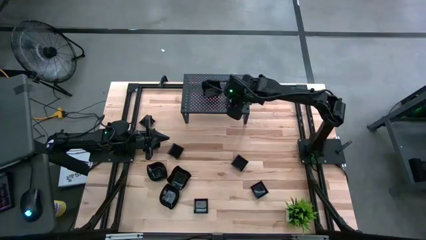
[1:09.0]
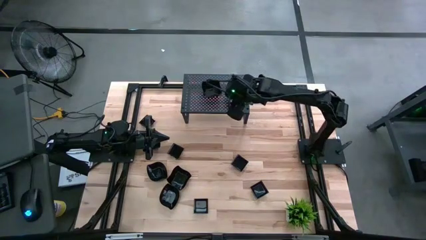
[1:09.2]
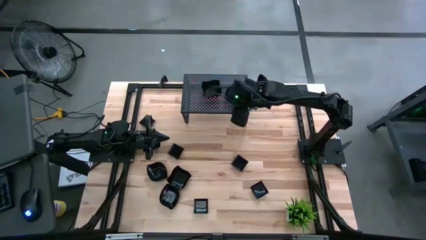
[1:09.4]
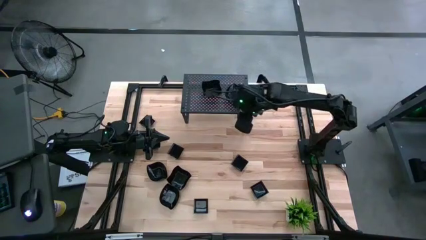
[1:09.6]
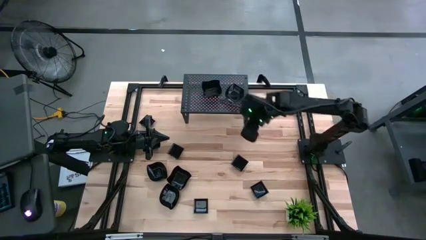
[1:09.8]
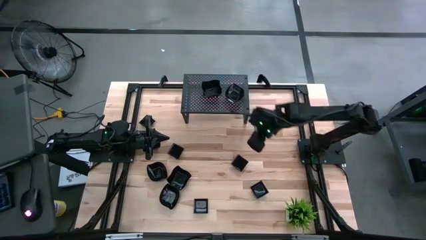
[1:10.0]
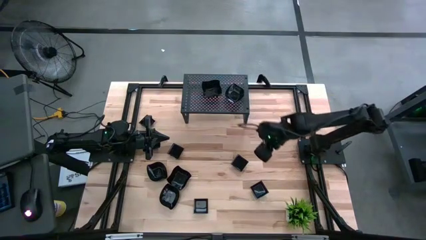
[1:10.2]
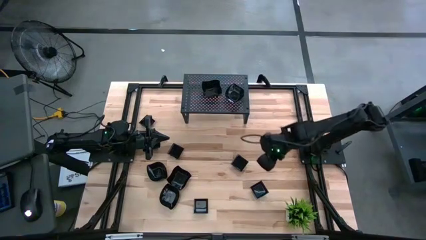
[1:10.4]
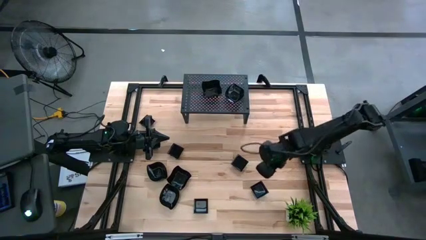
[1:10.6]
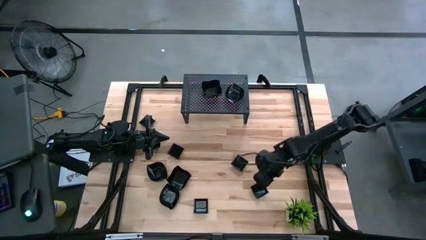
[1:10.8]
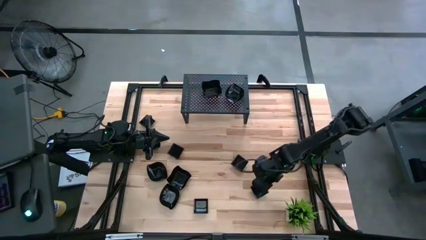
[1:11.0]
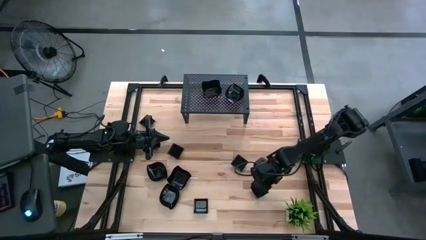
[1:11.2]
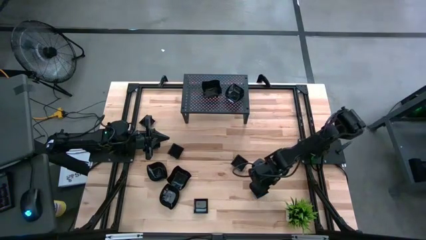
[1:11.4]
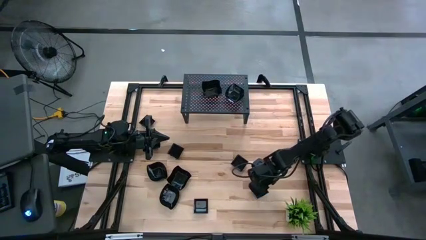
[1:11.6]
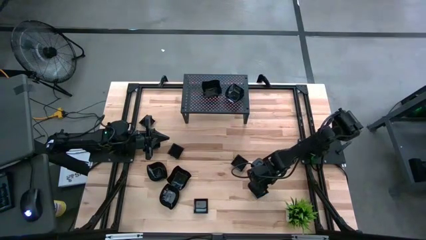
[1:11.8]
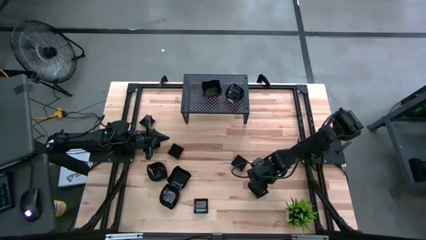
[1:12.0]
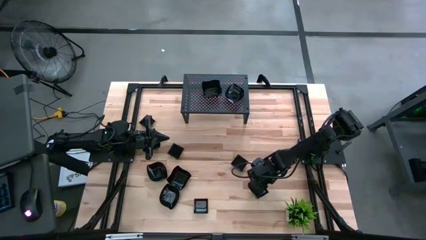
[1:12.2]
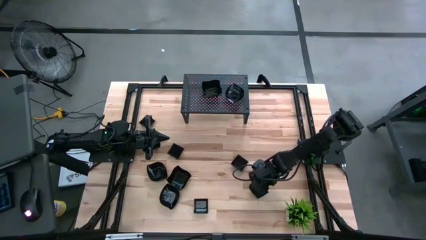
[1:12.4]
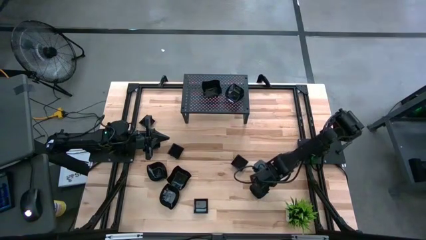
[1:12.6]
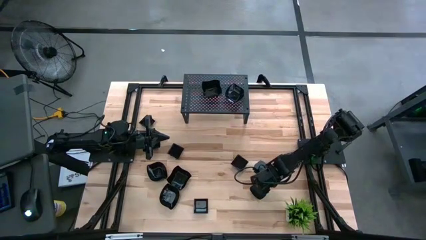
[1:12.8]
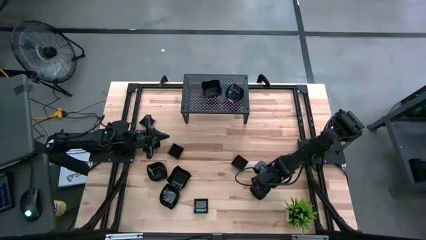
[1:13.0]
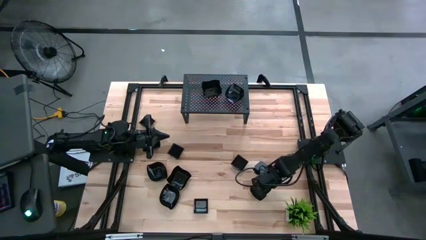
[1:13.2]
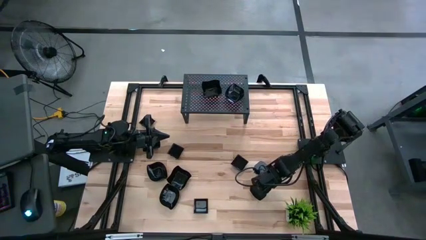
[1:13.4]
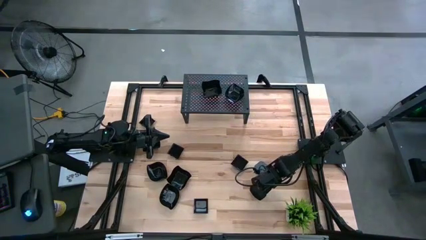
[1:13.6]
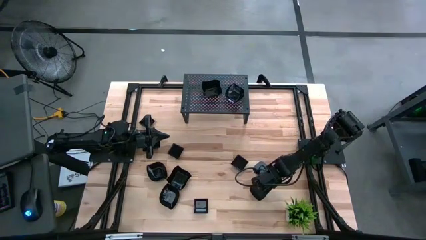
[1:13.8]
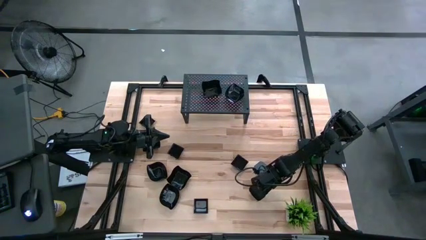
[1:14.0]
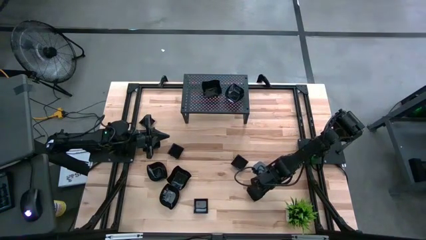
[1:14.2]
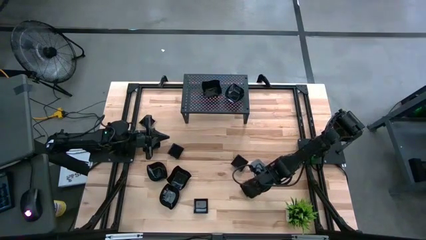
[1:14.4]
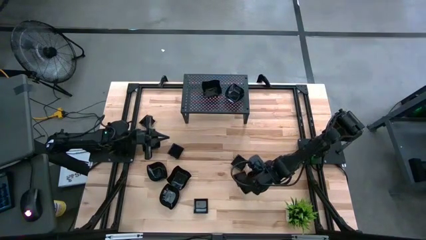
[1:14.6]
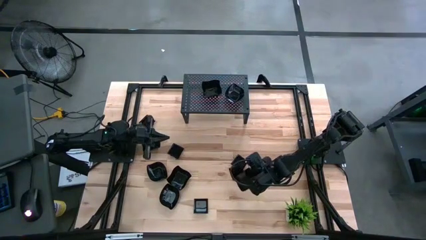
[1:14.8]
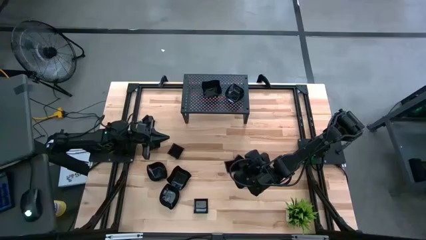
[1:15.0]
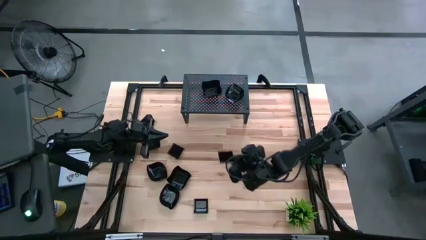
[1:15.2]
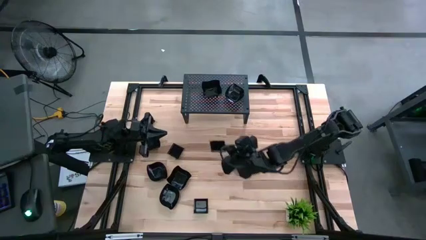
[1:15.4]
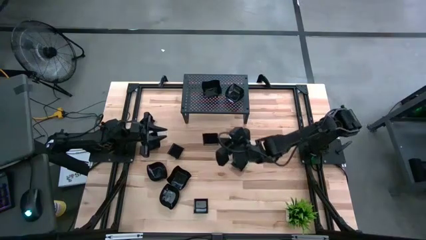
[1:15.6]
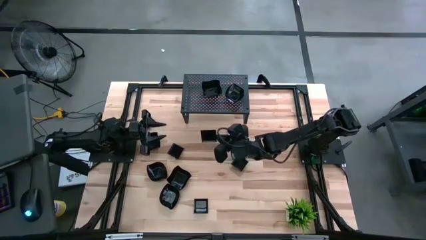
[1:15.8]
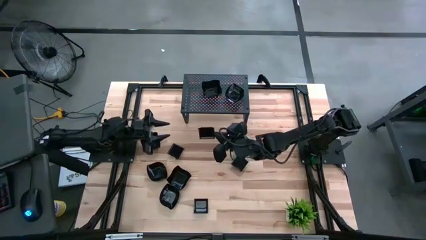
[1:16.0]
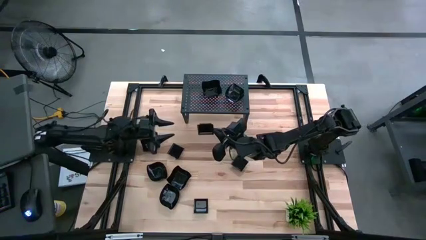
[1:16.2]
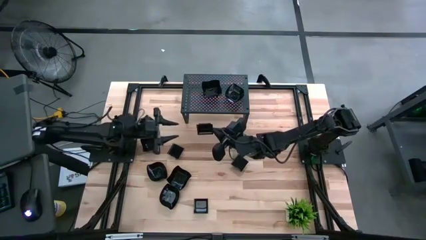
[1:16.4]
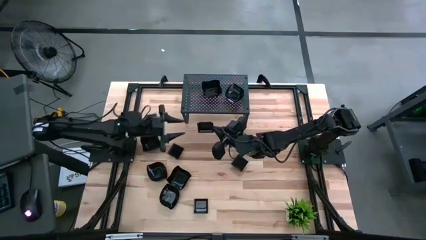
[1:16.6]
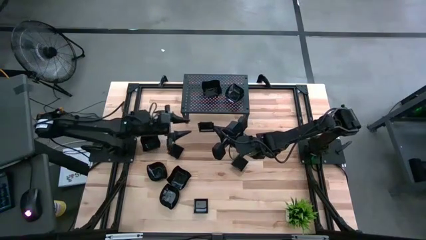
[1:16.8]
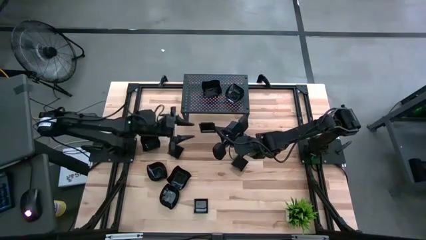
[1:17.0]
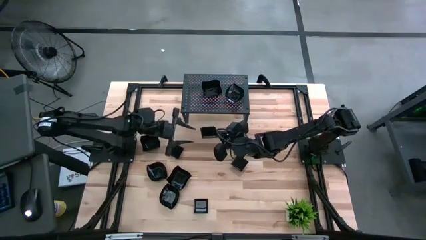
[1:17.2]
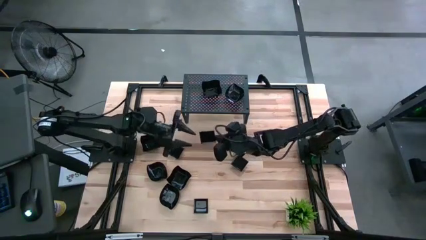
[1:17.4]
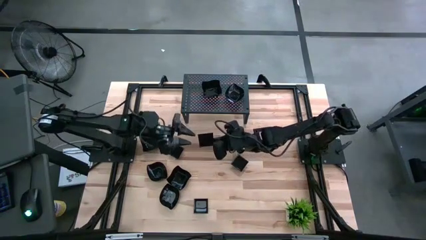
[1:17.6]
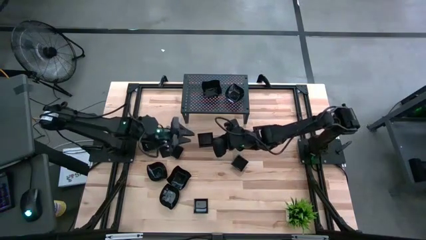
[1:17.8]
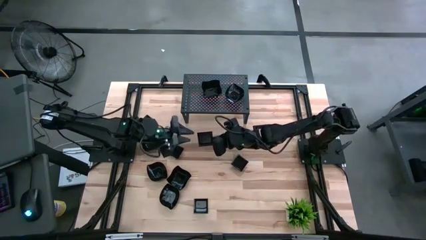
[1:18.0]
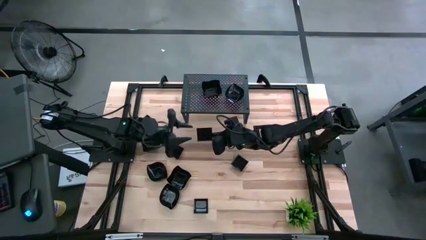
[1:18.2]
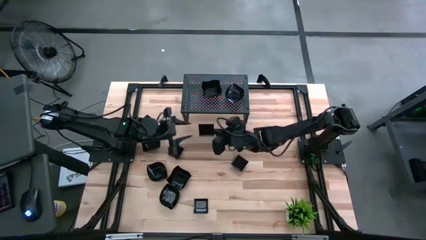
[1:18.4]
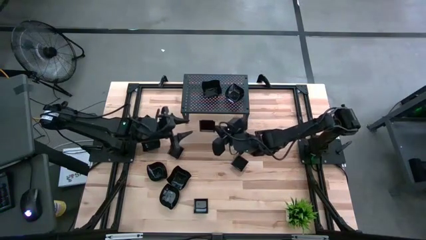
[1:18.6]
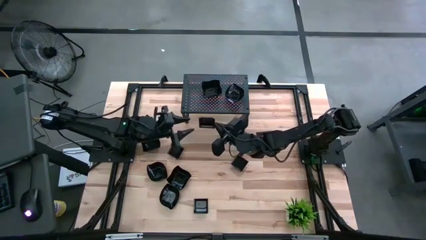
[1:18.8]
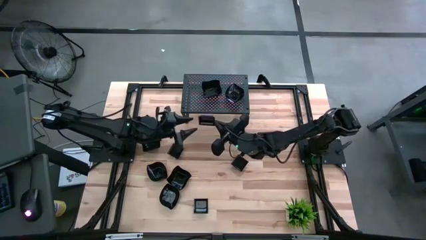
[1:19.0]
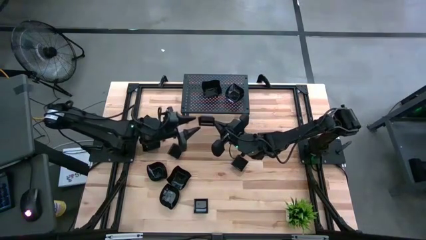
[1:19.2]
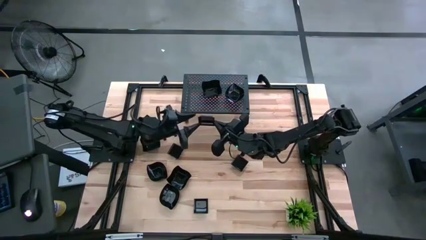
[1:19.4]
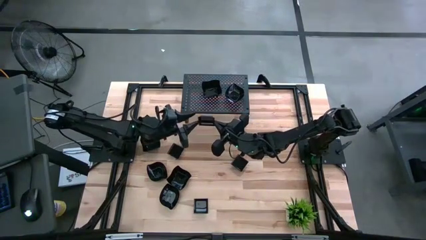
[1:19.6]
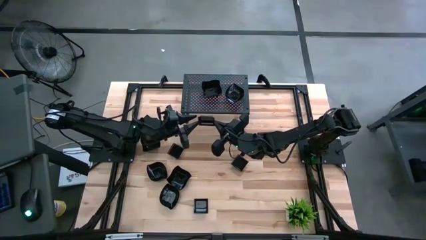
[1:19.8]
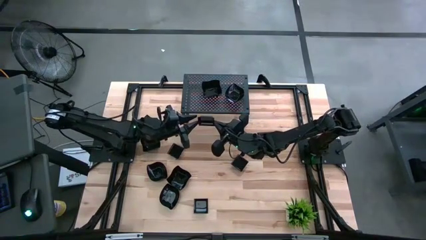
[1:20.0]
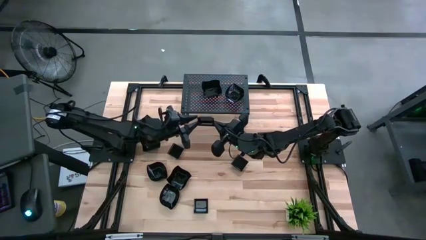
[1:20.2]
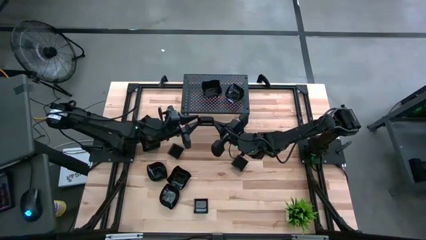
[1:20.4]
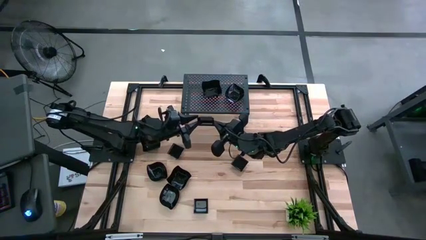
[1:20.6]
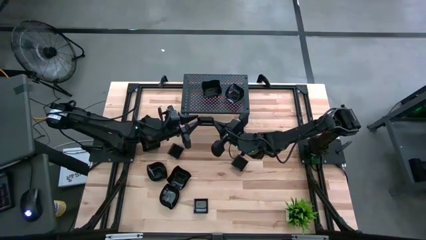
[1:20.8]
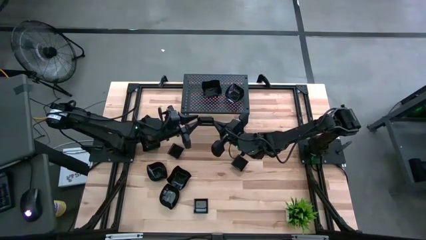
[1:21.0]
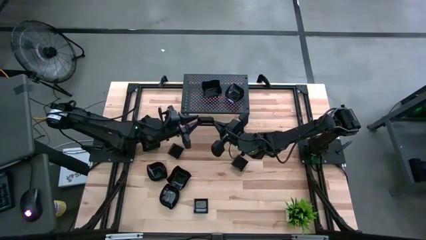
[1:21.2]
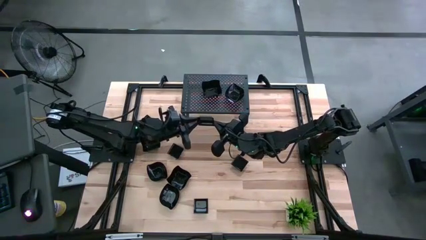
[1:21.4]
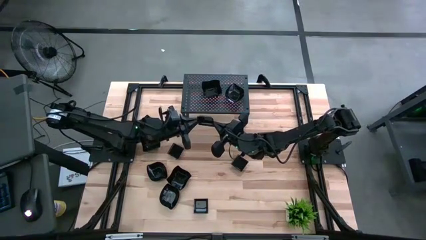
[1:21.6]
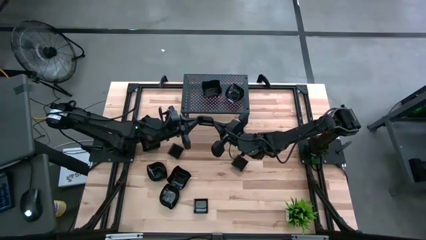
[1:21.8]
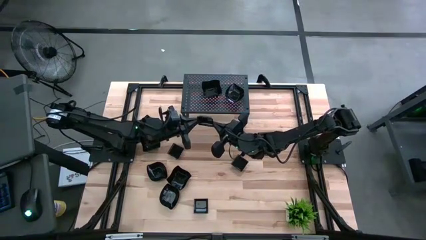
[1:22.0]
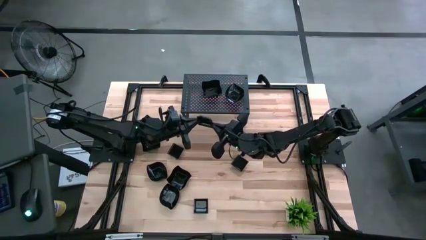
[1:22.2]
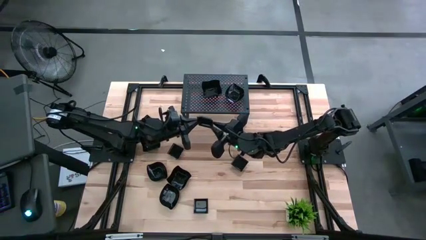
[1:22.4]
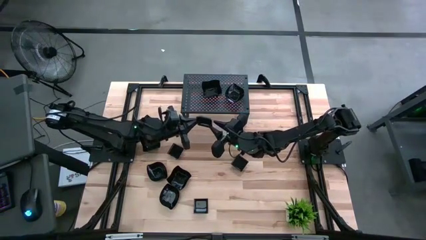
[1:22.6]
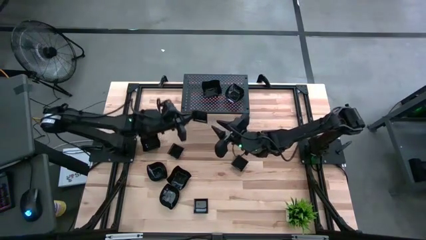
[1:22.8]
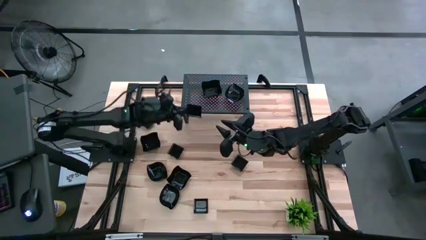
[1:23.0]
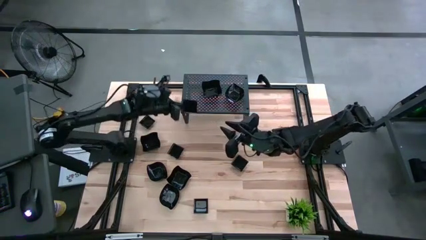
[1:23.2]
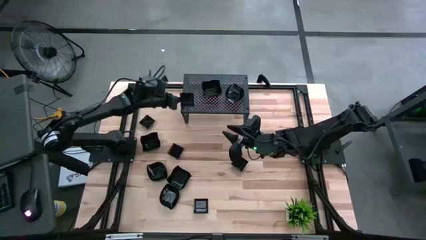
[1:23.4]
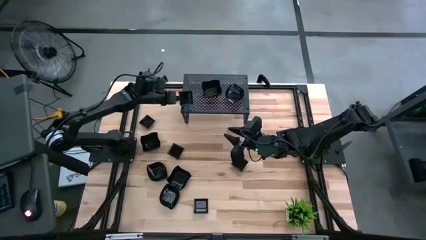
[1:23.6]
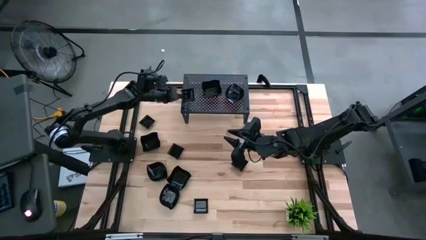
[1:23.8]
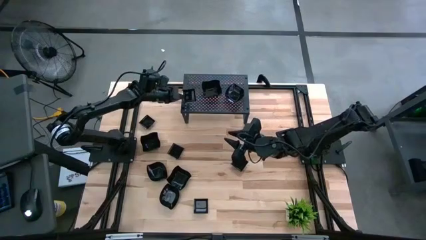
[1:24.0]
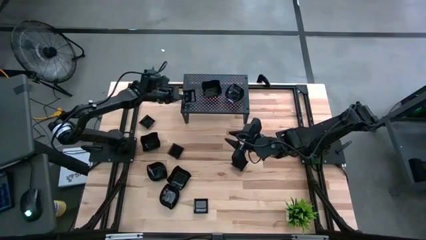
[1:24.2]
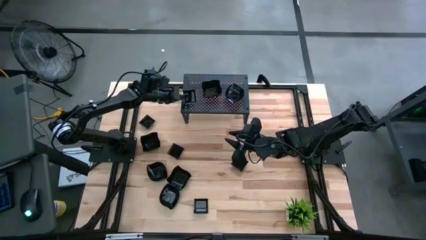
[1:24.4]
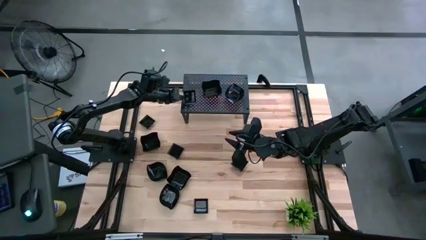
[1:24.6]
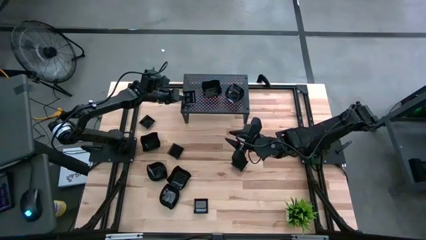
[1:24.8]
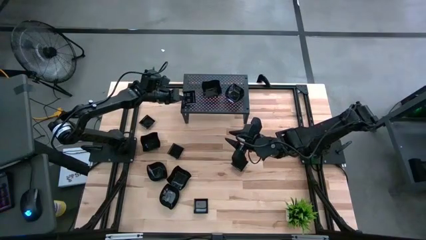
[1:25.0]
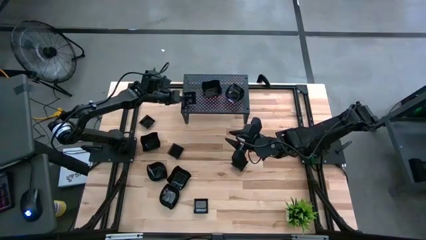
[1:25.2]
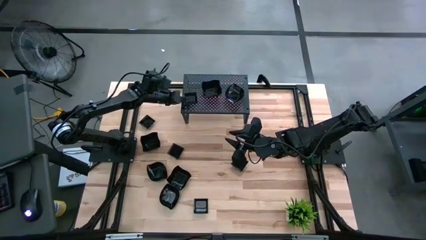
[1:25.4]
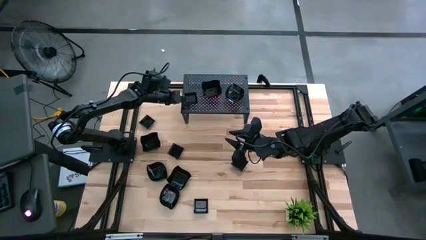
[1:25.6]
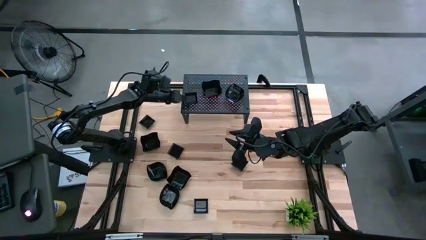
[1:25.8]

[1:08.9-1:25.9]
Task: Pick & Place Mini shaped plates
Put the square plate on the shelf
